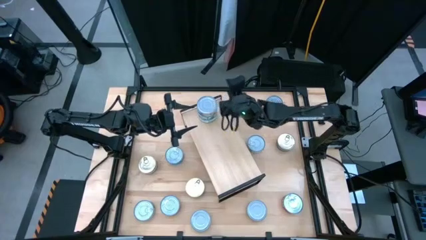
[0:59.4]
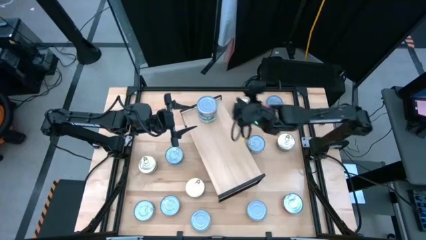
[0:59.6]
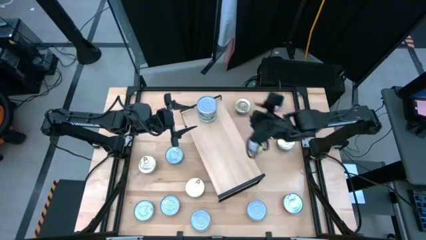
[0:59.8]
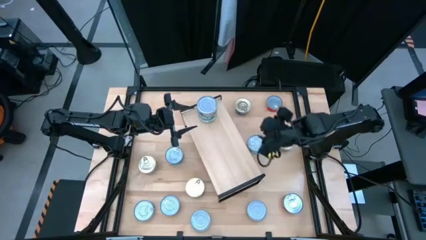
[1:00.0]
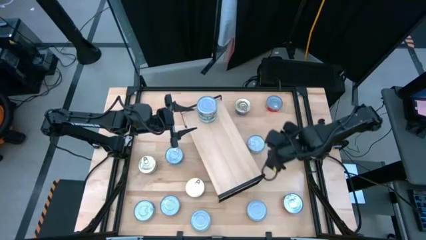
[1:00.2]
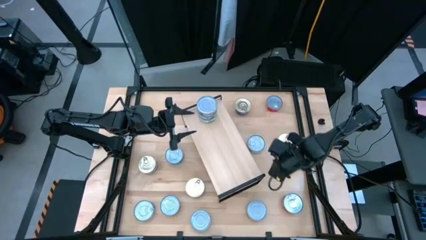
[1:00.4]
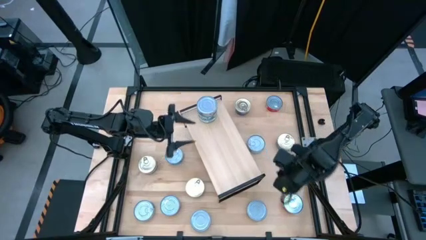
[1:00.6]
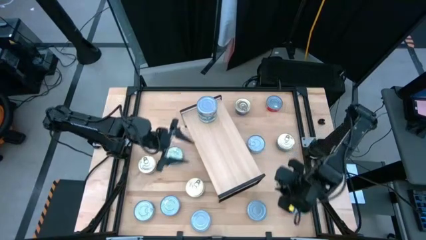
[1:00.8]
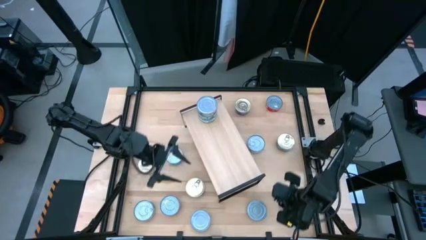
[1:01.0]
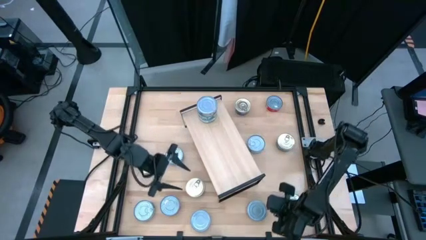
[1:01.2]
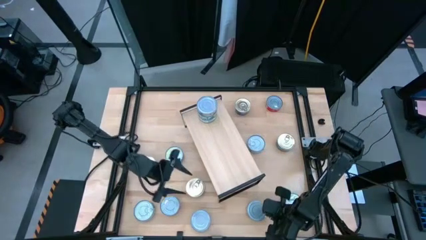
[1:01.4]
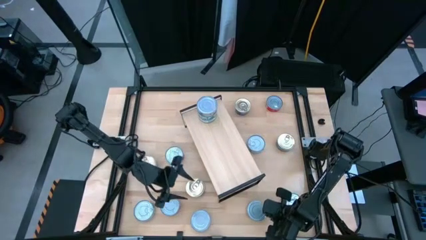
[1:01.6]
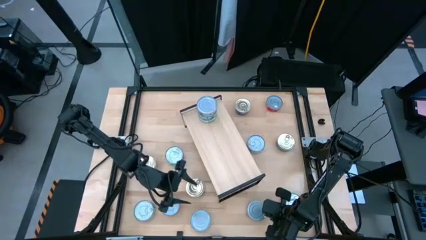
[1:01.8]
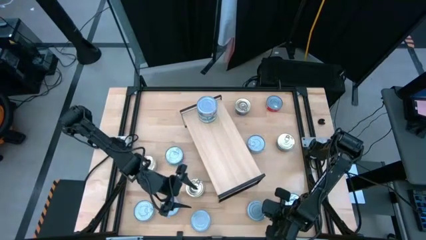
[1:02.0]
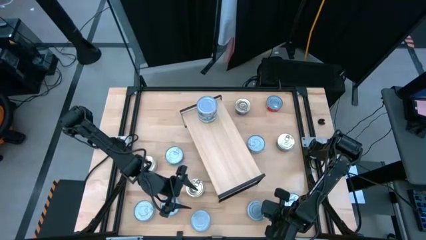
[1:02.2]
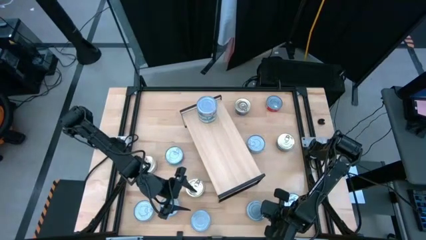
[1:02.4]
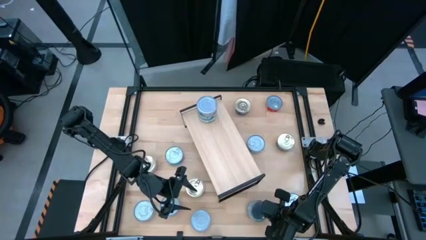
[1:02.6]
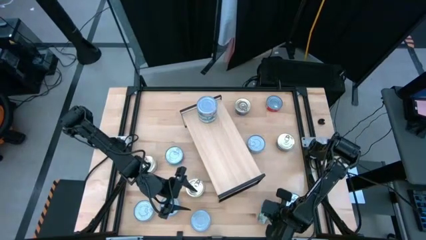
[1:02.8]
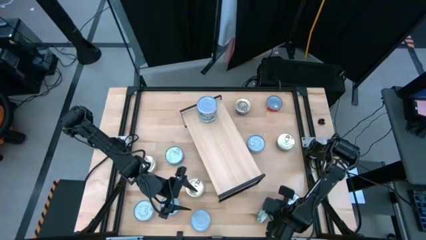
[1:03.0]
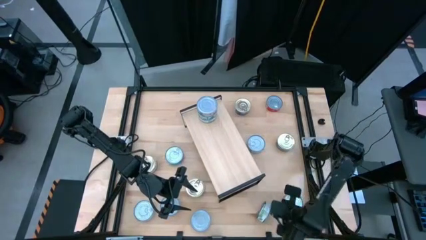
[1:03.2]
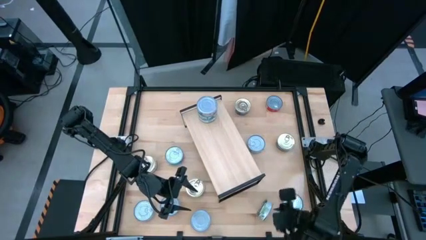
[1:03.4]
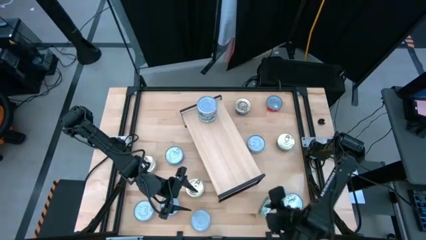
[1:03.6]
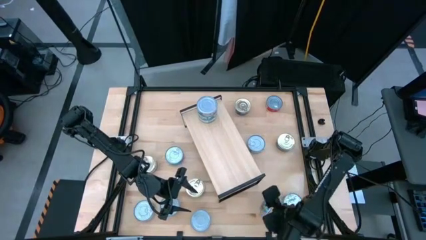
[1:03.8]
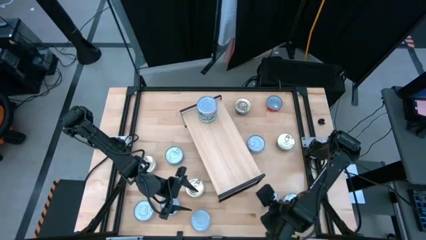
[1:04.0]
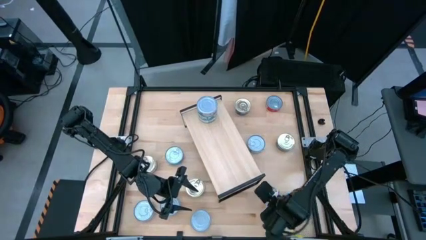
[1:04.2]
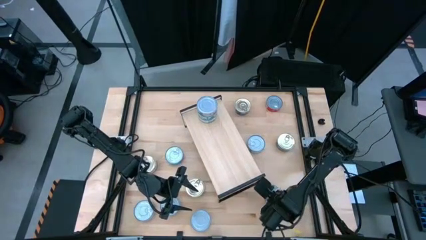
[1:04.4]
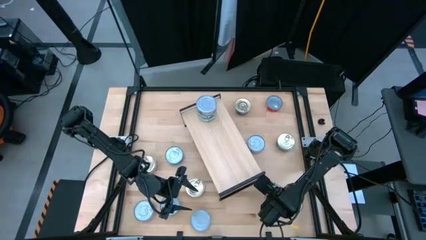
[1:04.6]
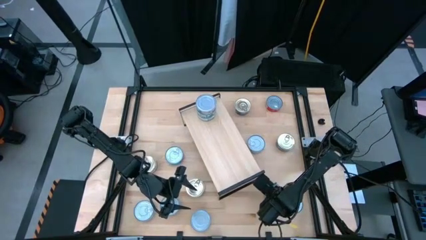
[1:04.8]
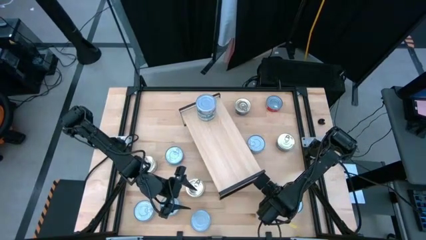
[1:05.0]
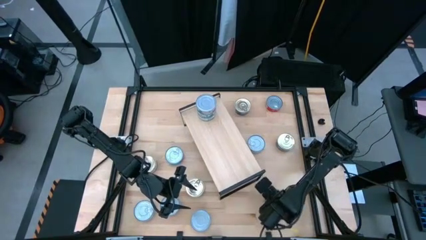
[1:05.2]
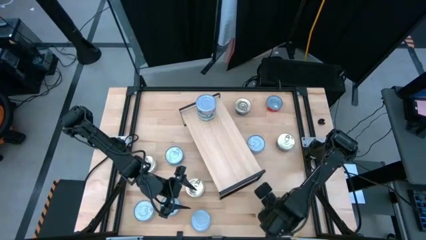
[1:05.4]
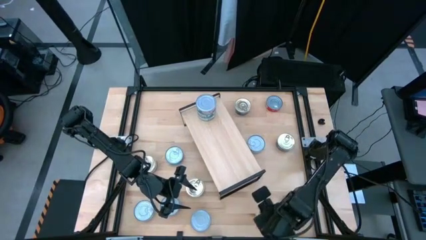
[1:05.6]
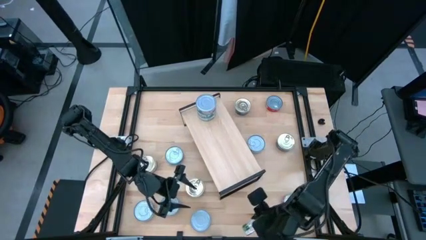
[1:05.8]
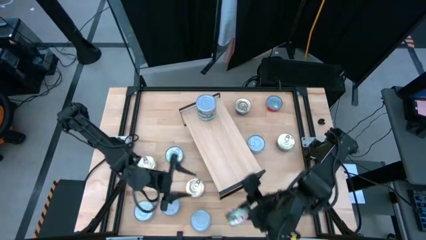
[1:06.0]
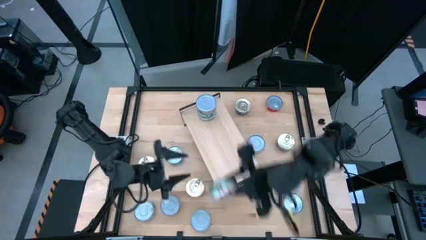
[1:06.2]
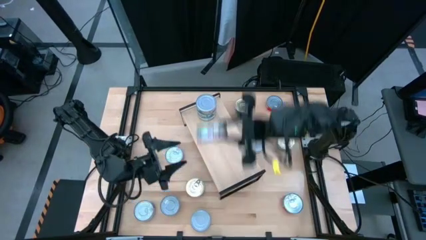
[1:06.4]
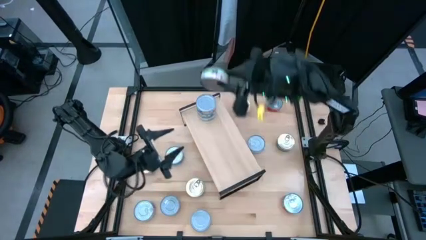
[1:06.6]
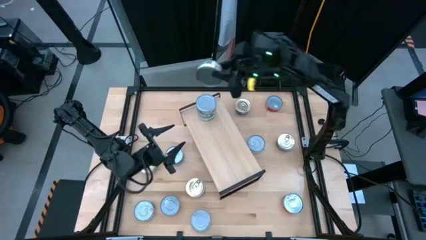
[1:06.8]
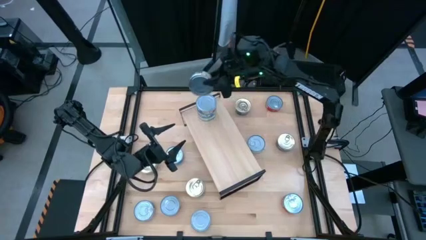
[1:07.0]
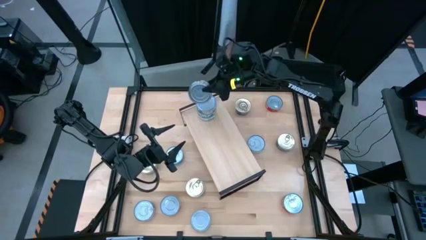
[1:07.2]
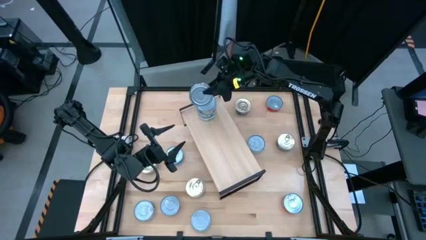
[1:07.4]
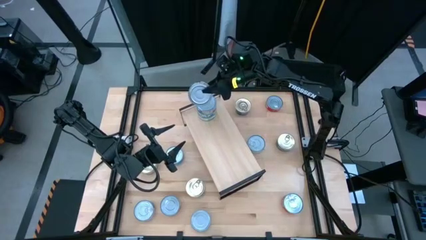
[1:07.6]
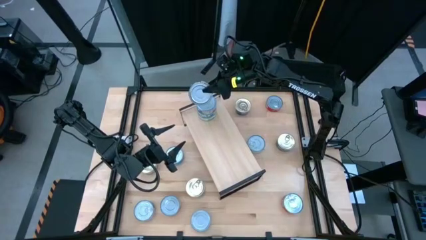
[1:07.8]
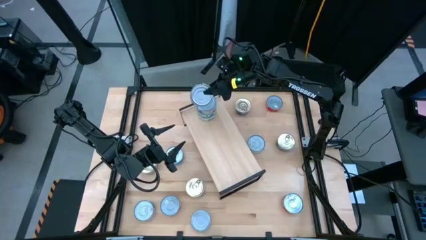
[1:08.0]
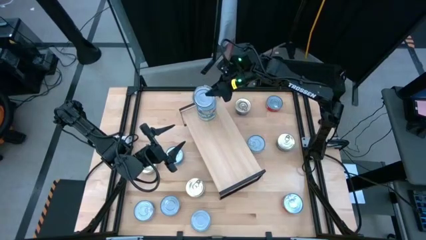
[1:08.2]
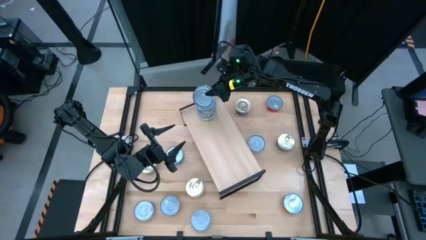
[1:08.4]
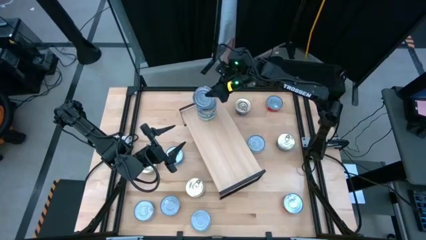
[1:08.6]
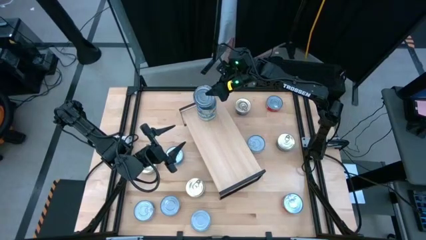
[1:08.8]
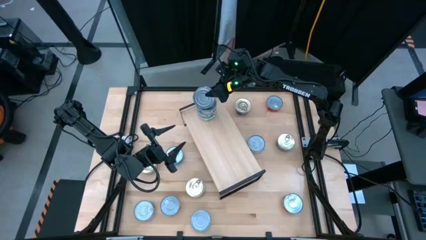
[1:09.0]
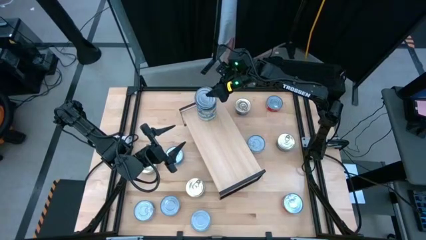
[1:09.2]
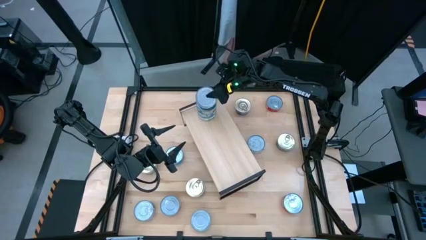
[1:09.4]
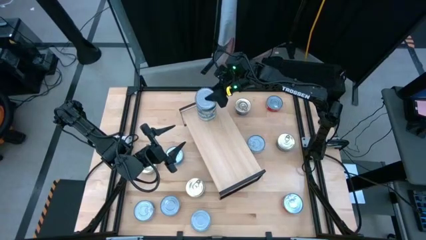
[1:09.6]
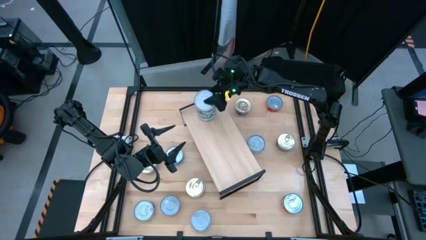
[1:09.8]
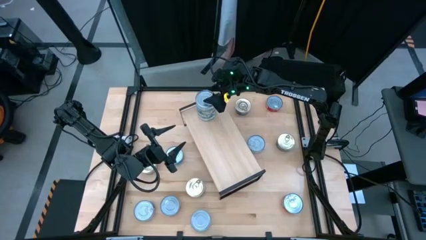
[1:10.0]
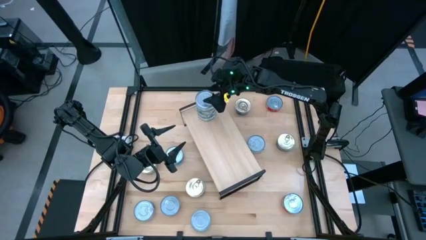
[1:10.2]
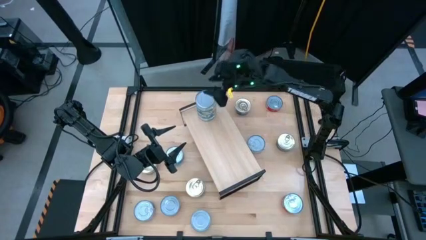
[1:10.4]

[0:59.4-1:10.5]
Task: Stack canned seafood by type on shelf
Stack the green tuna can on top of the other tuna can on the shelf
